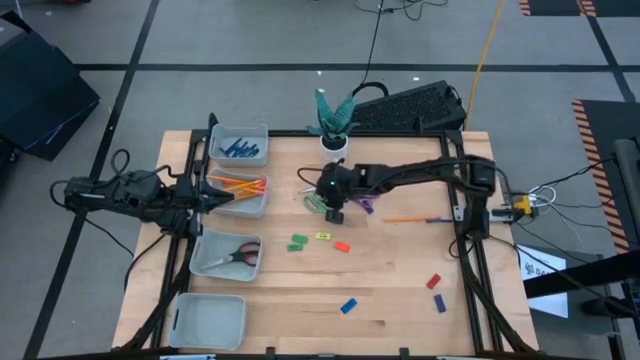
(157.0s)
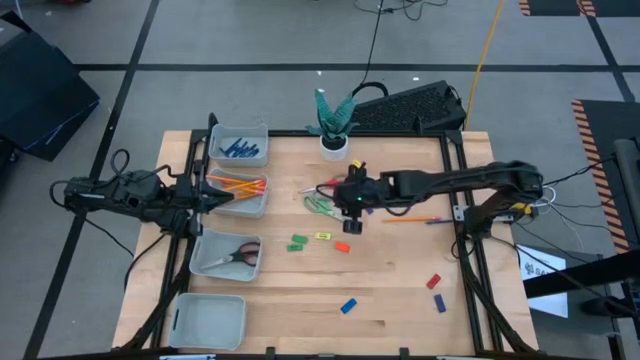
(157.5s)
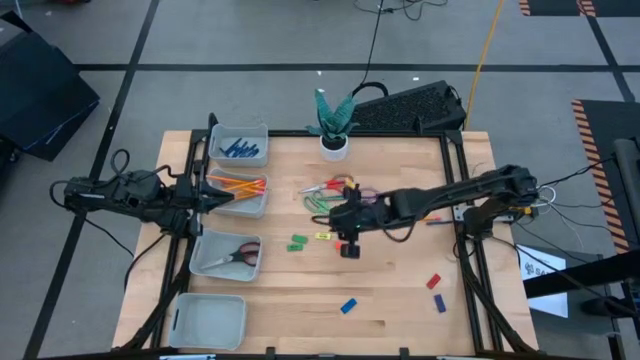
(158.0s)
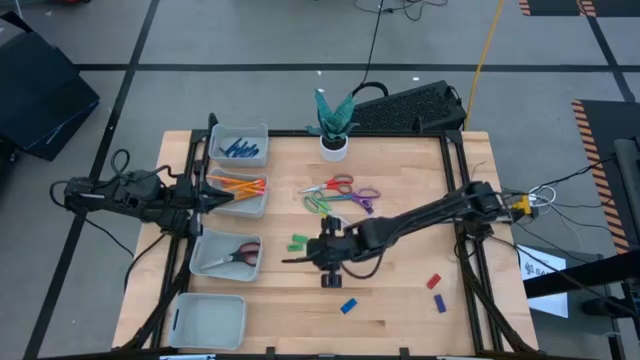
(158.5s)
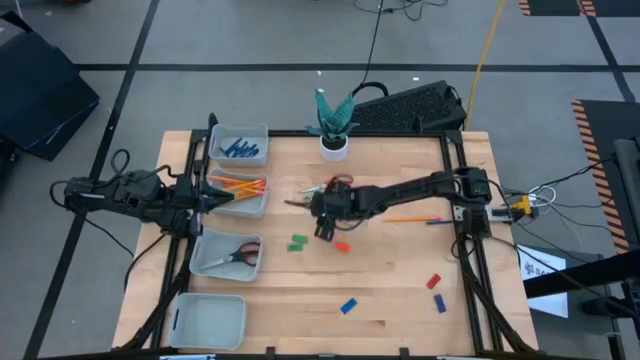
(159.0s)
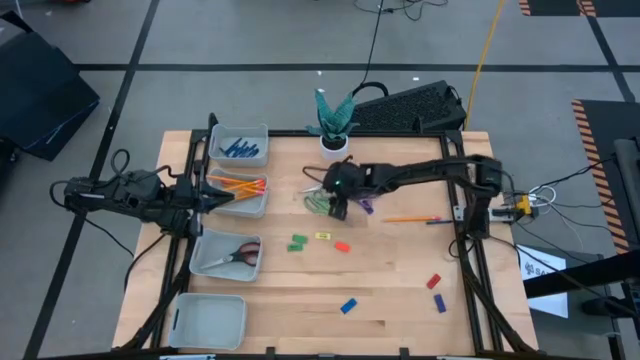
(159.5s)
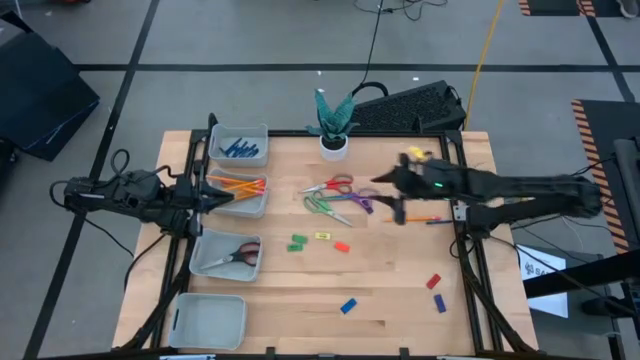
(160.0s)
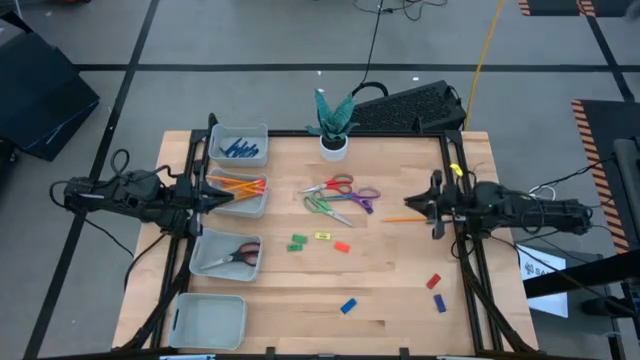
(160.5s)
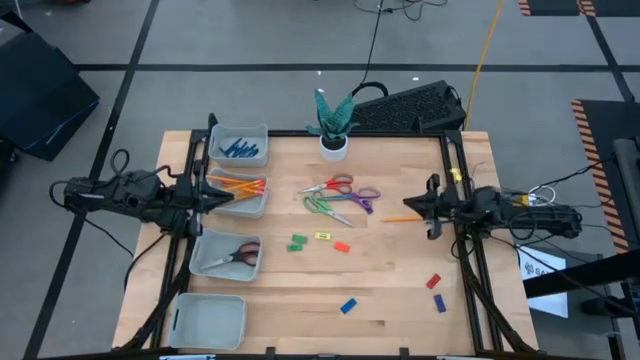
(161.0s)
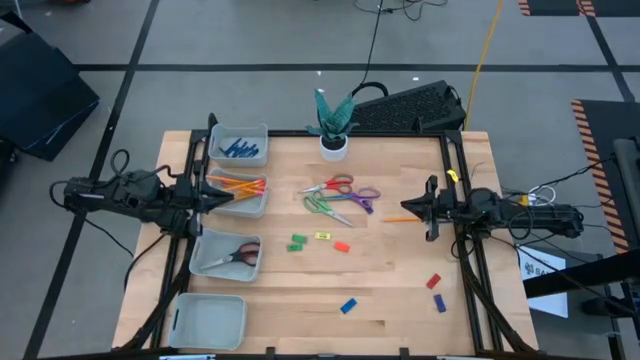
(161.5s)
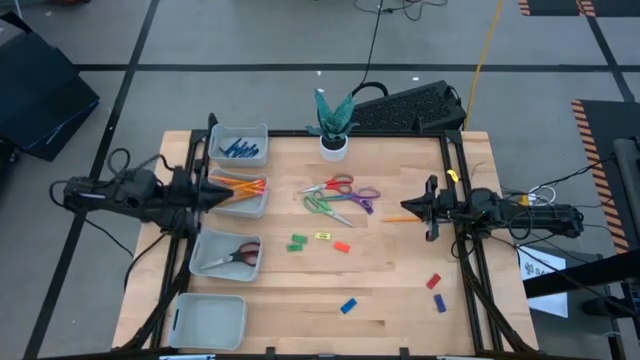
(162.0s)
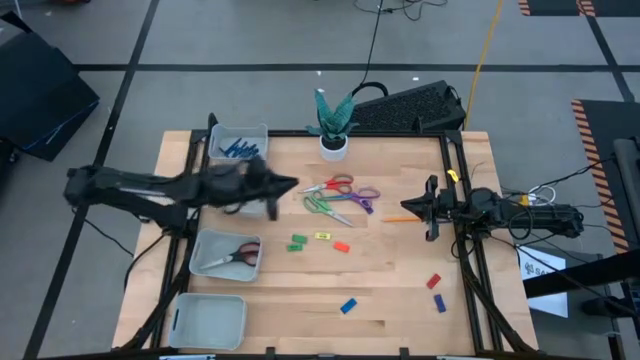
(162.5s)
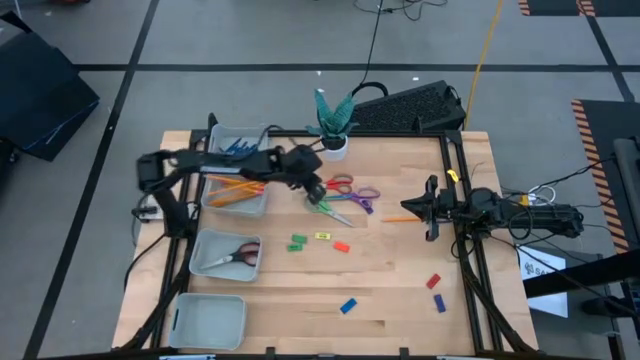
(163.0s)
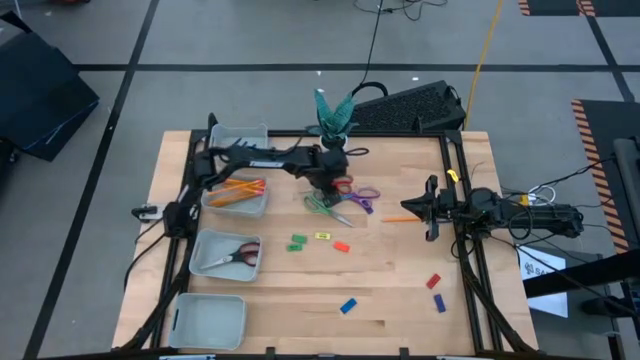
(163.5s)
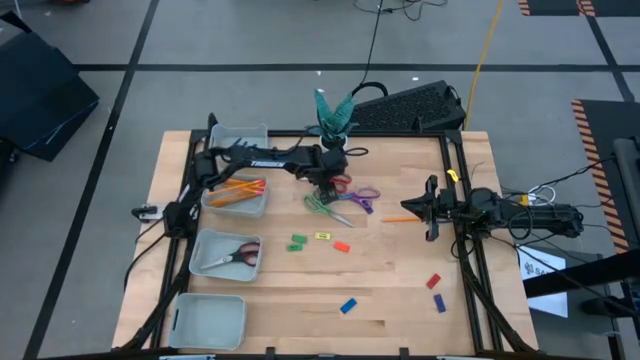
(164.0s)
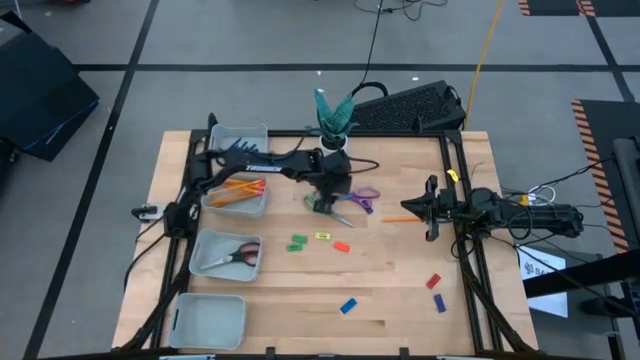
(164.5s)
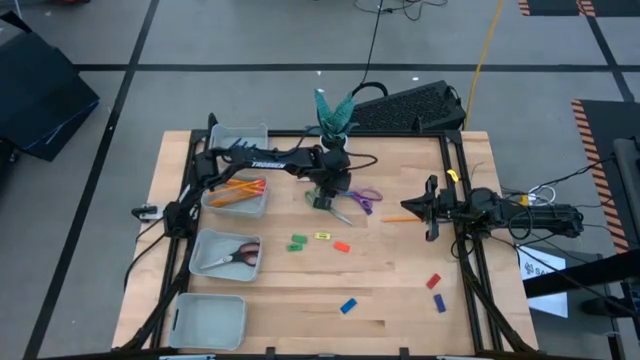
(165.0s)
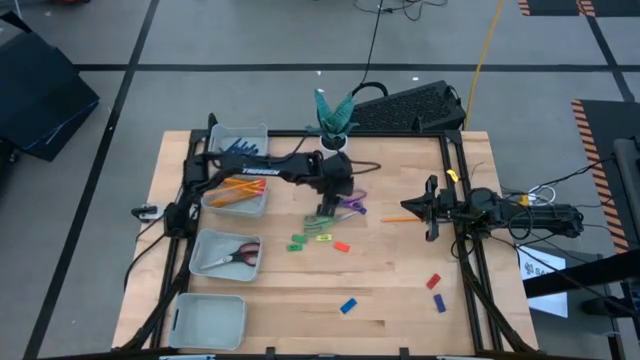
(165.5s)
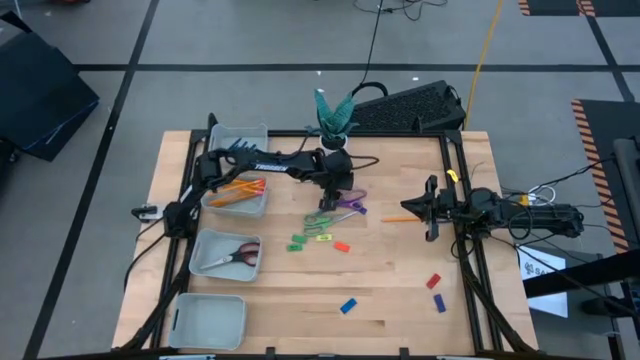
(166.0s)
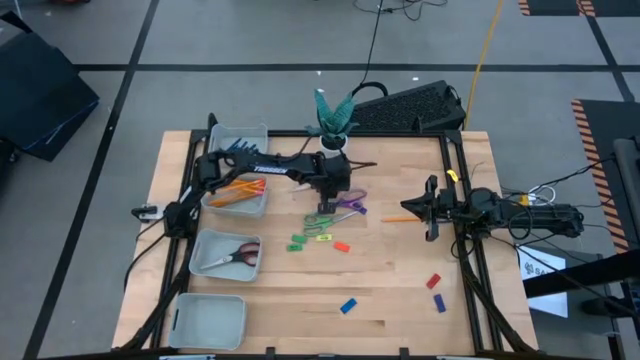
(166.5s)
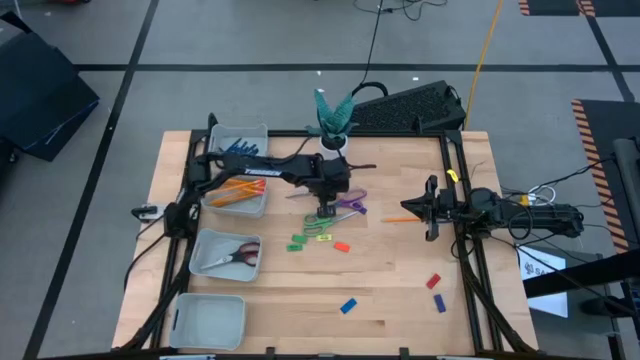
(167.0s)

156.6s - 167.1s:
Task: Sort crayons/erasers/pens/pencils in bins
Put the orange scissors into the middle bottom gray bin

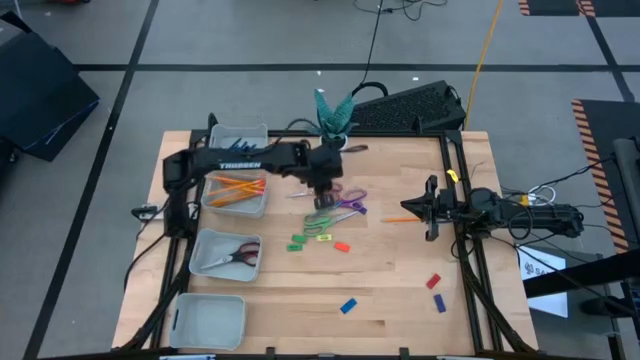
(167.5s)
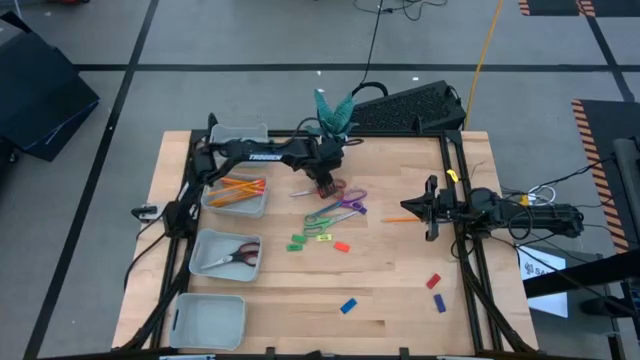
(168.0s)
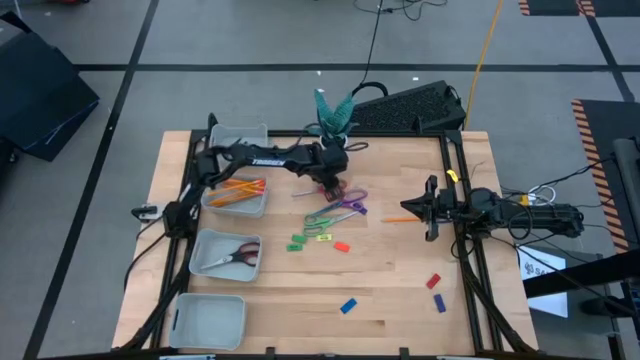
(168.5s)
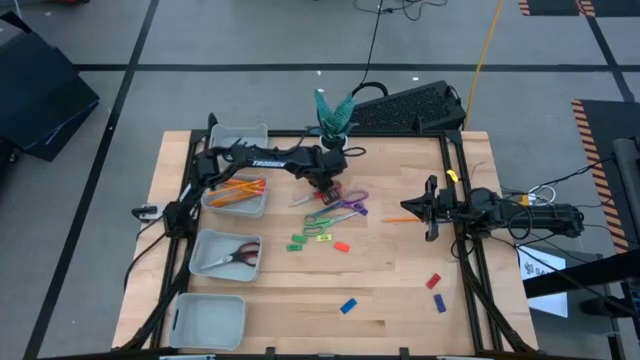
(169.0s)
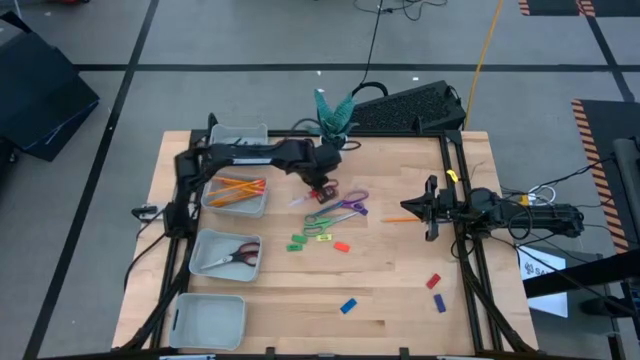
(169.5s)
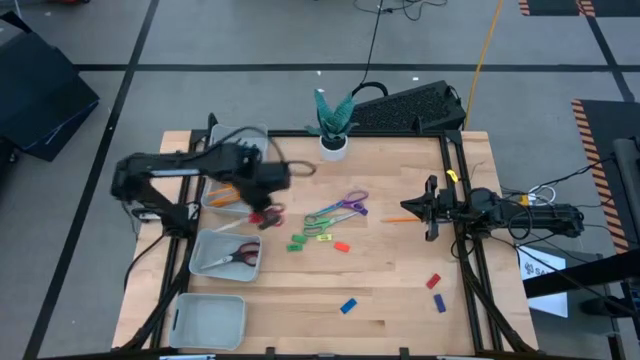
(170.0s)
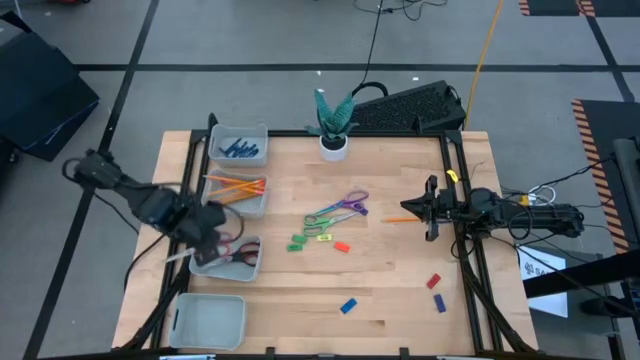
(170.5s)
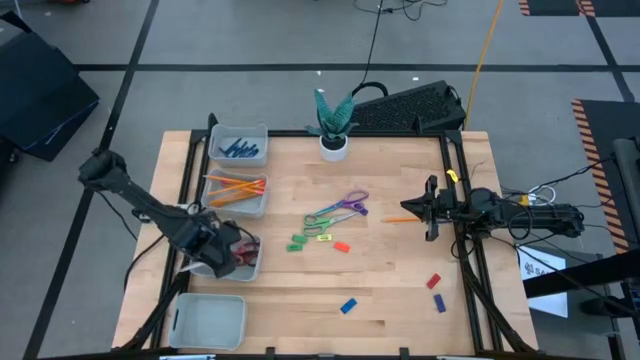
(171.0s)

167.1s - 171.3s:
Put the orange scissors into the middle bottom gray bin

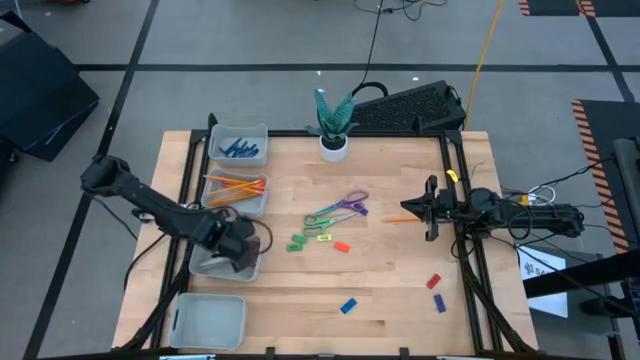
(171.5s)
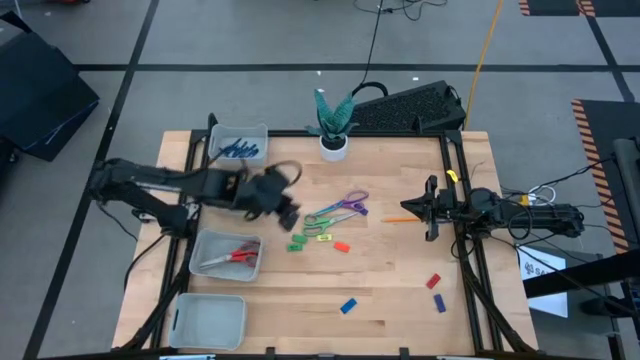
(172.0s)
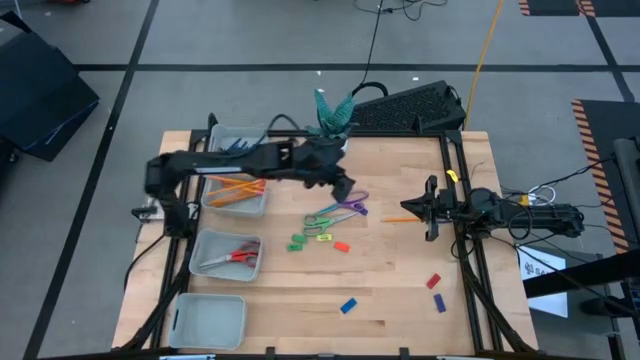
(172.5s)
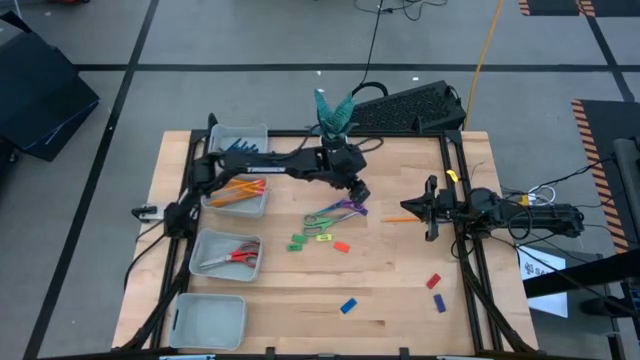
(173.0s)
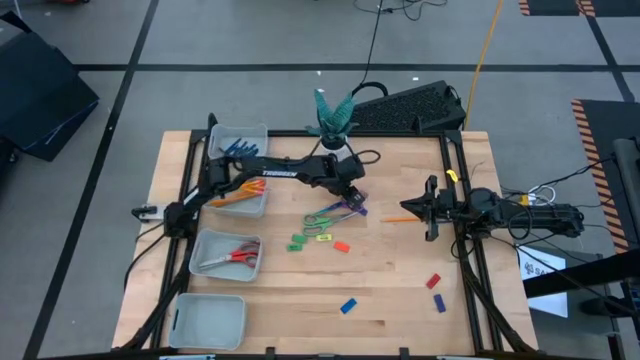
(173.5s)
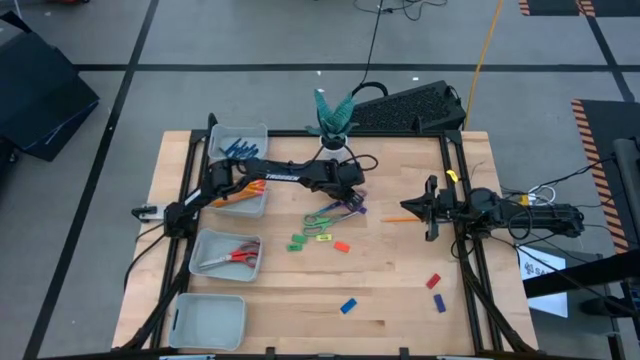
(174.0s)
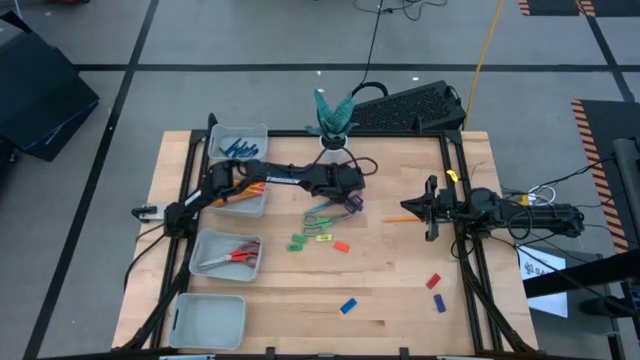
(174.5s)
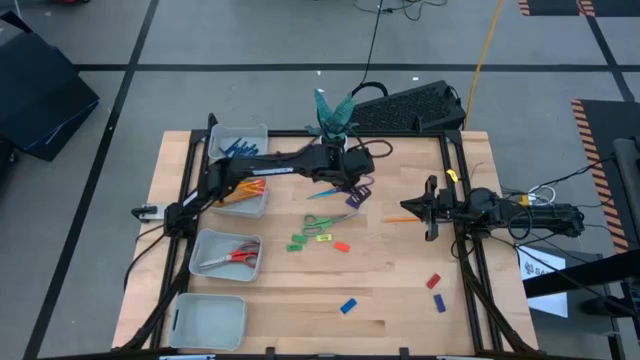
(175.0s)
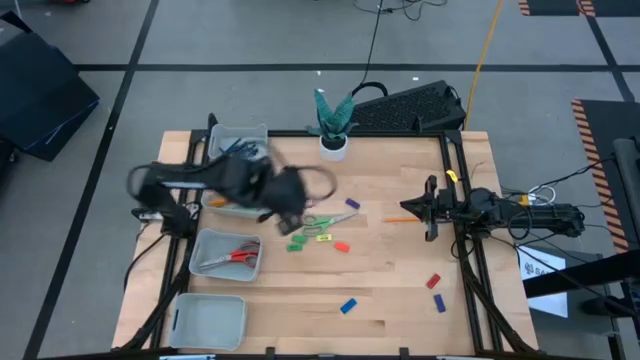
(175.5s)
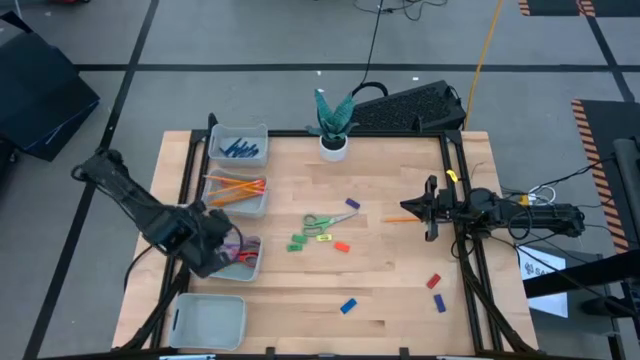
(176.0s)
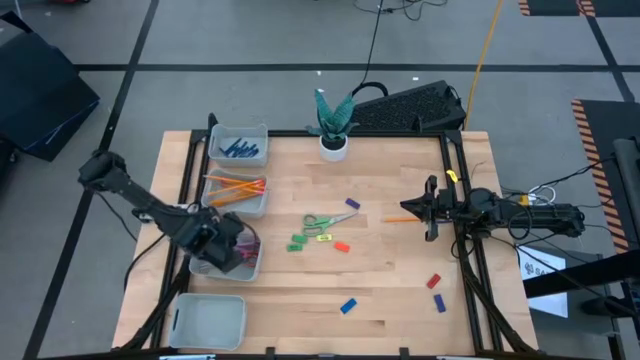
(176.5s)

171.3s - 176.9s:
Put the purple scissors into the middle bottom gray bin

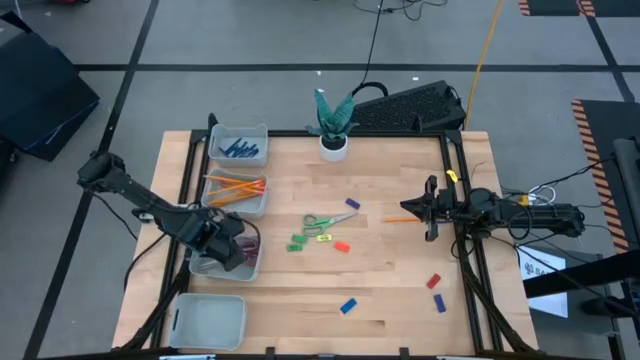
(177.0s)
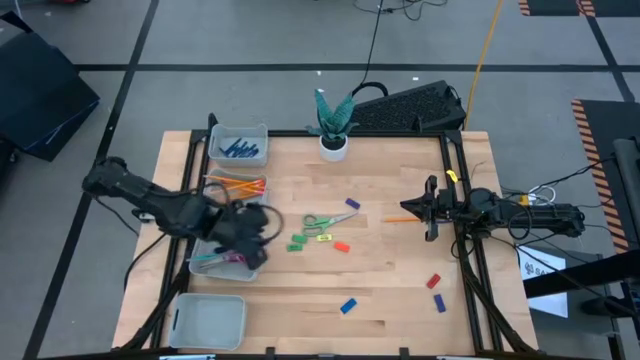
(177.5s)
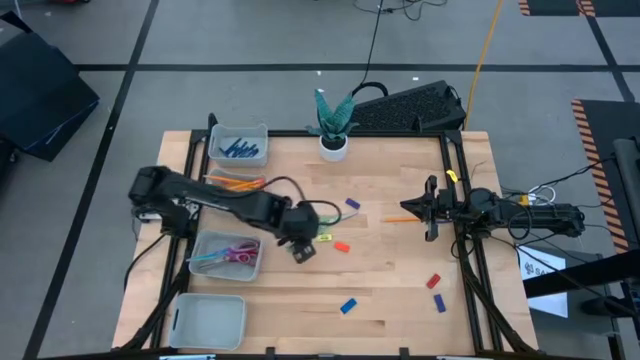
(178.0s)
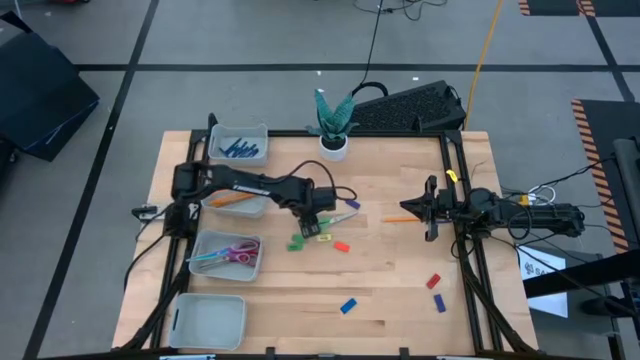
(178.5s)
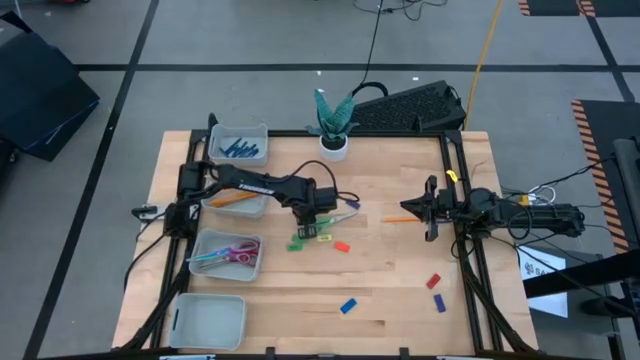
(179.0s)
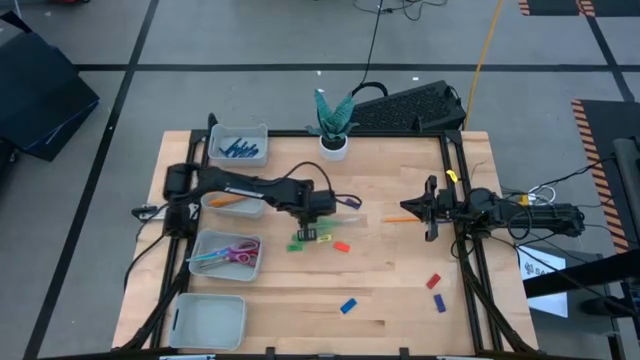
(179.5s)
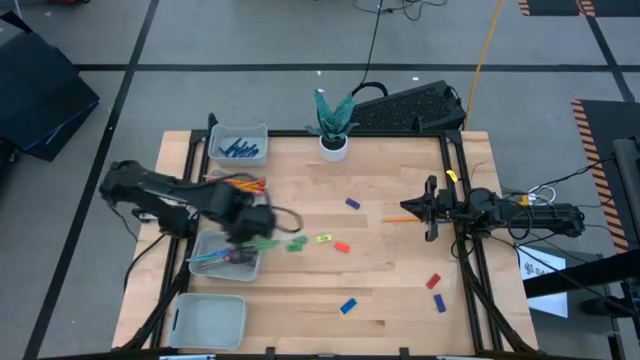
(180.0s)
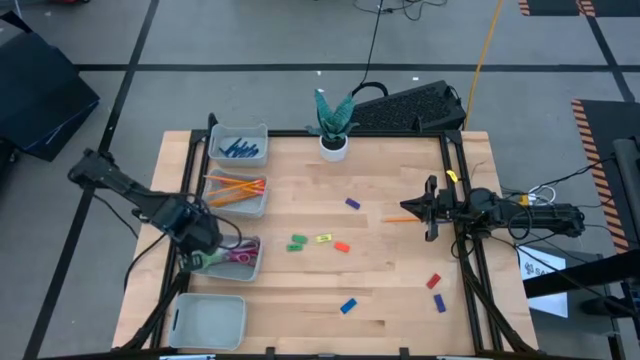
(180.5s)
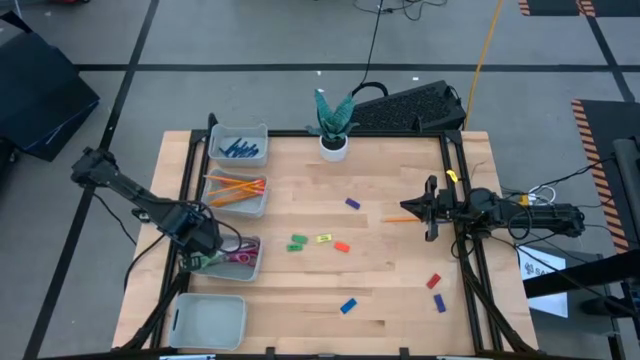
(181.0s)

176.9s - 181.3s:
Put the green scissors into the middle bottom gray bin
